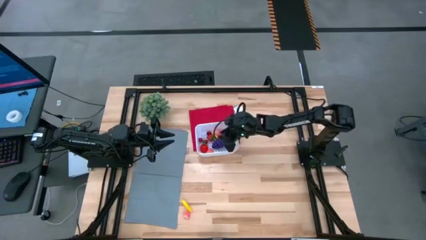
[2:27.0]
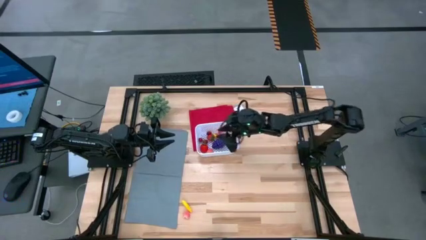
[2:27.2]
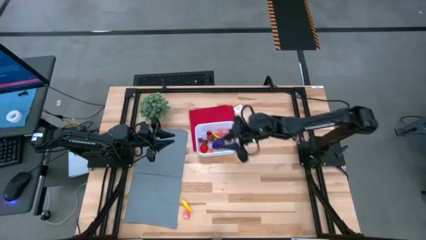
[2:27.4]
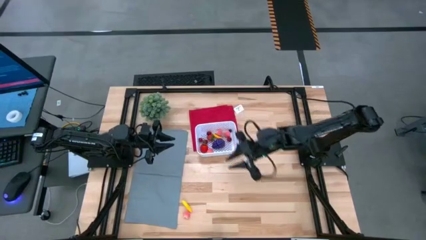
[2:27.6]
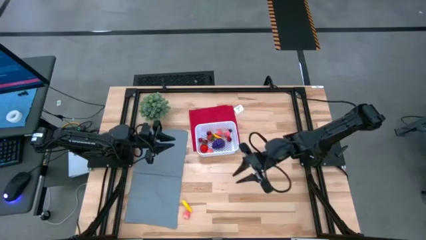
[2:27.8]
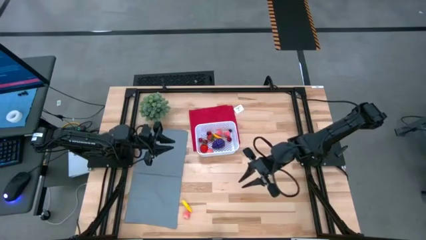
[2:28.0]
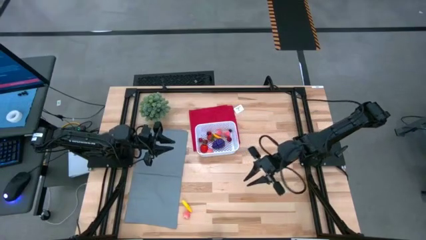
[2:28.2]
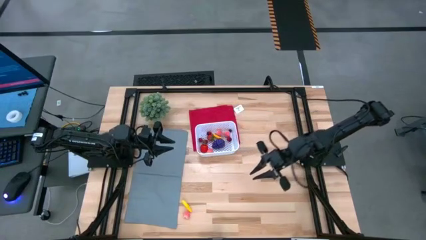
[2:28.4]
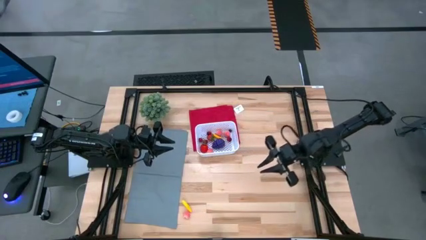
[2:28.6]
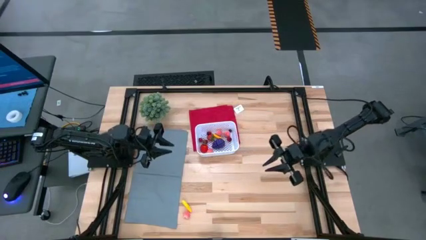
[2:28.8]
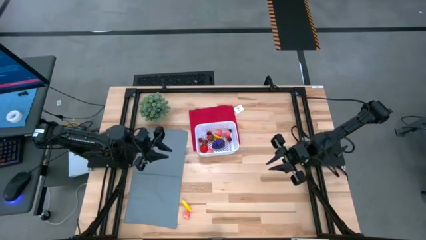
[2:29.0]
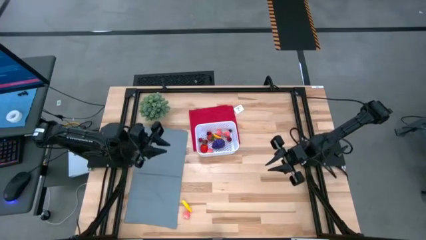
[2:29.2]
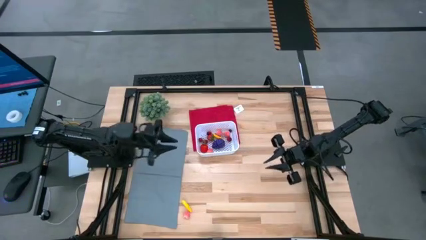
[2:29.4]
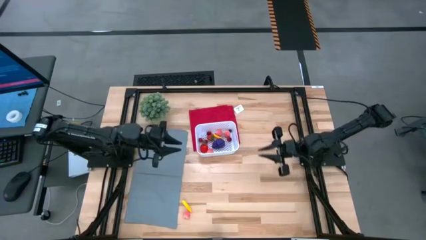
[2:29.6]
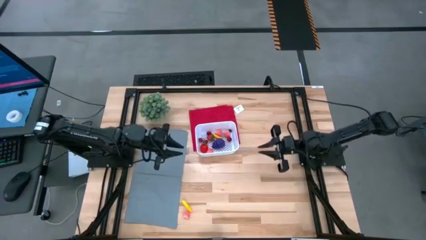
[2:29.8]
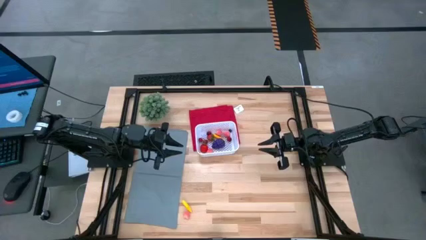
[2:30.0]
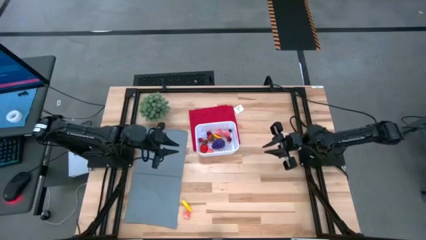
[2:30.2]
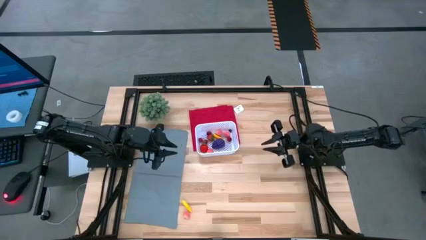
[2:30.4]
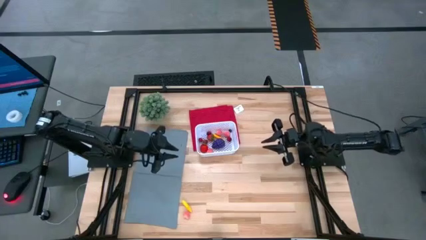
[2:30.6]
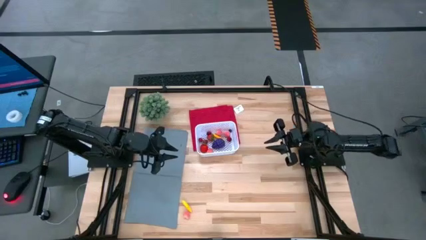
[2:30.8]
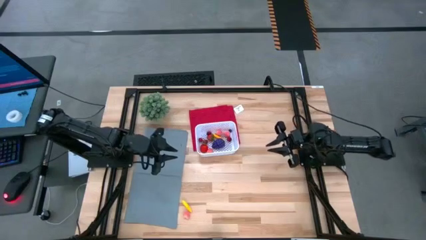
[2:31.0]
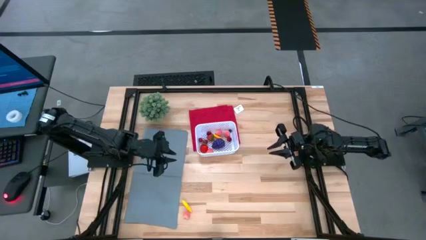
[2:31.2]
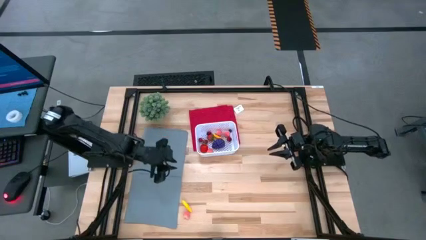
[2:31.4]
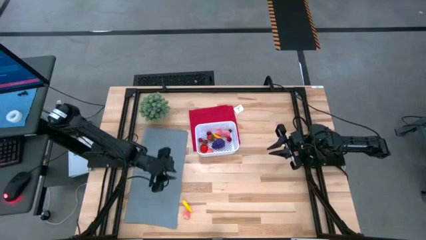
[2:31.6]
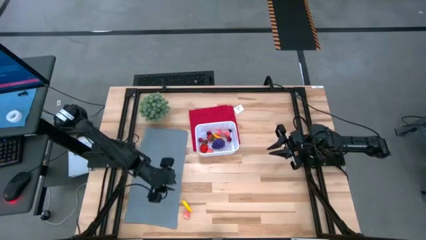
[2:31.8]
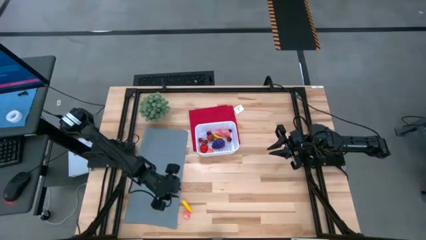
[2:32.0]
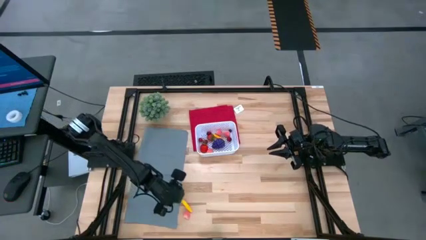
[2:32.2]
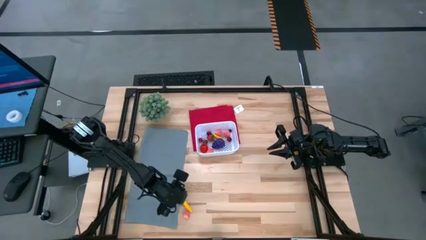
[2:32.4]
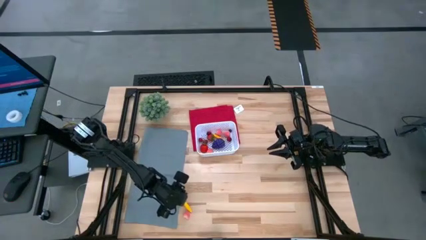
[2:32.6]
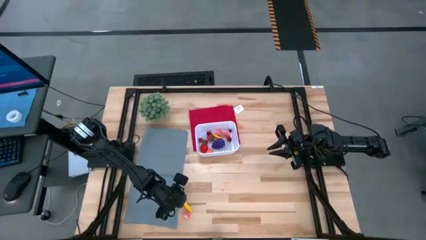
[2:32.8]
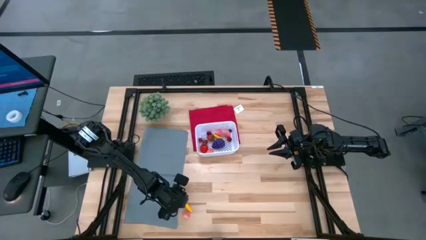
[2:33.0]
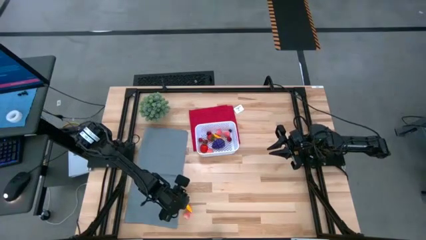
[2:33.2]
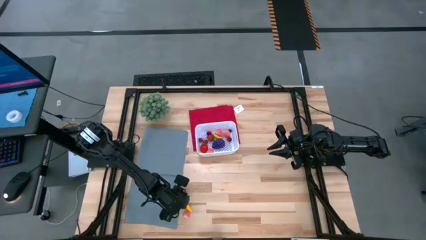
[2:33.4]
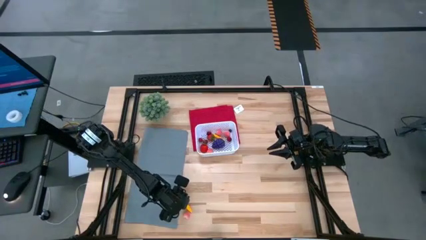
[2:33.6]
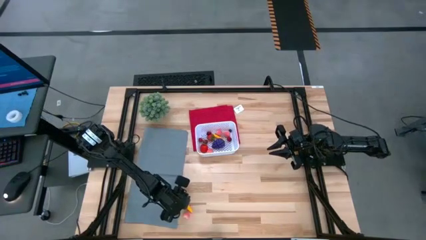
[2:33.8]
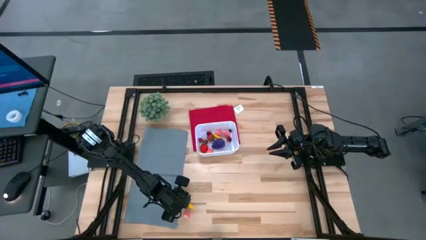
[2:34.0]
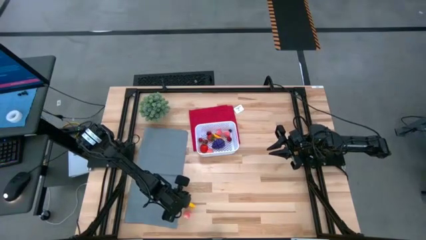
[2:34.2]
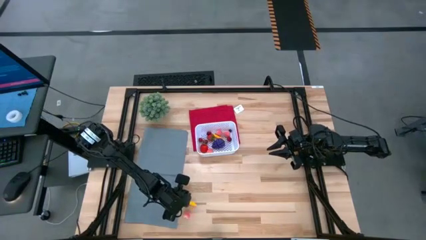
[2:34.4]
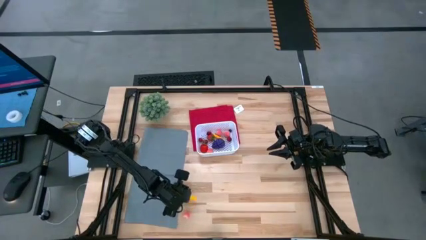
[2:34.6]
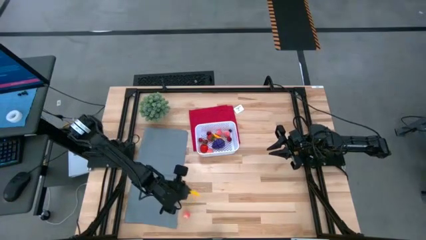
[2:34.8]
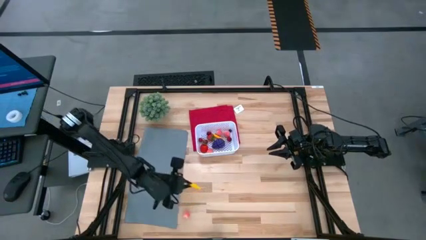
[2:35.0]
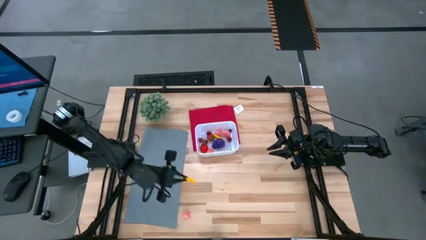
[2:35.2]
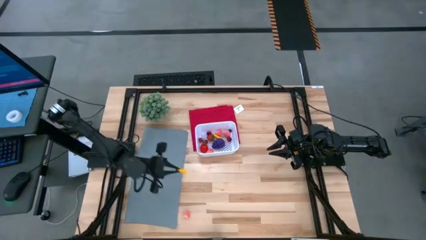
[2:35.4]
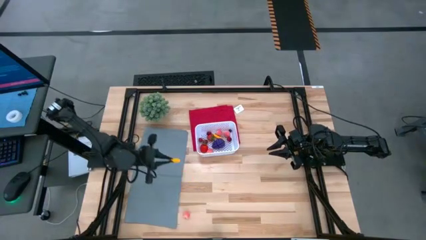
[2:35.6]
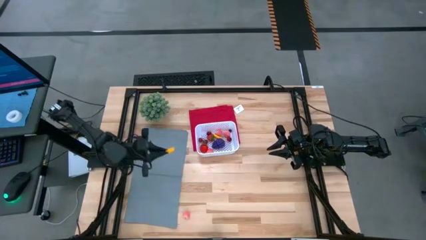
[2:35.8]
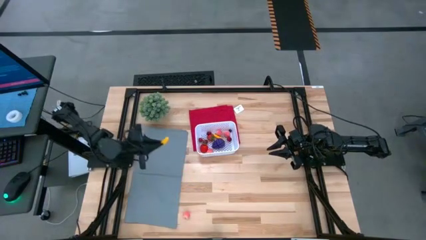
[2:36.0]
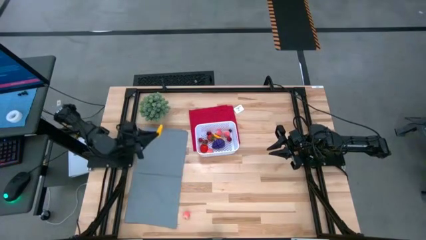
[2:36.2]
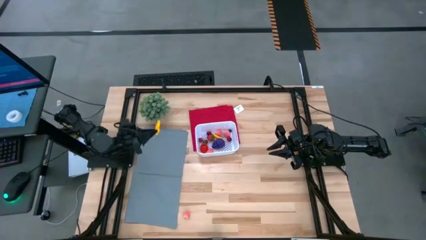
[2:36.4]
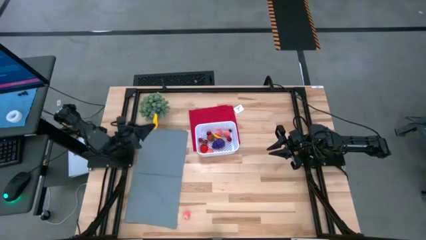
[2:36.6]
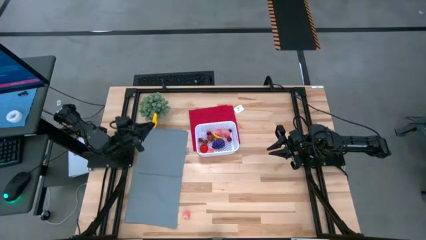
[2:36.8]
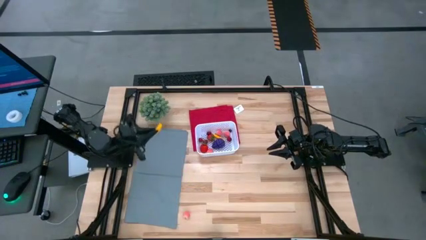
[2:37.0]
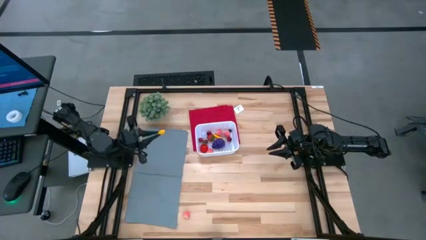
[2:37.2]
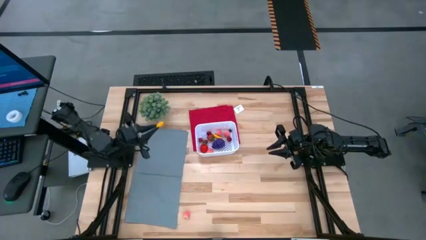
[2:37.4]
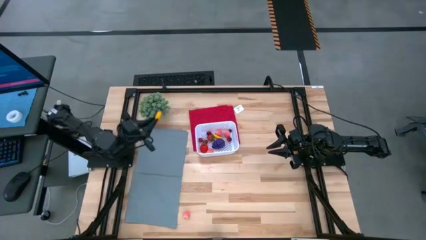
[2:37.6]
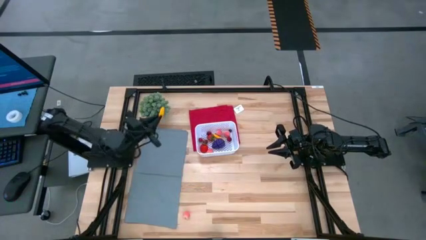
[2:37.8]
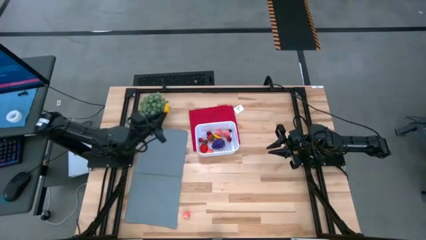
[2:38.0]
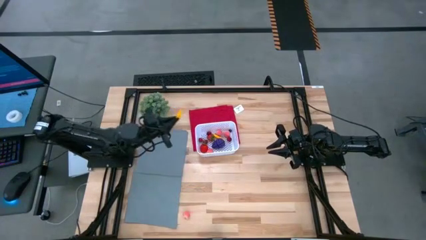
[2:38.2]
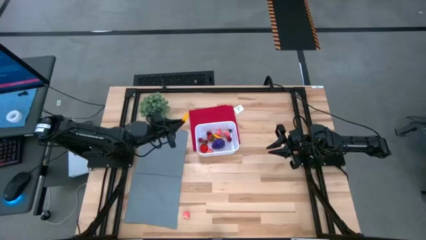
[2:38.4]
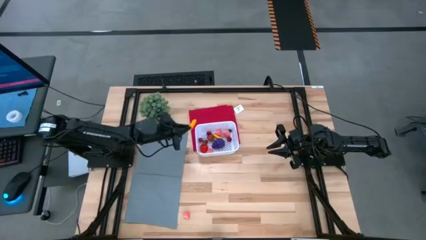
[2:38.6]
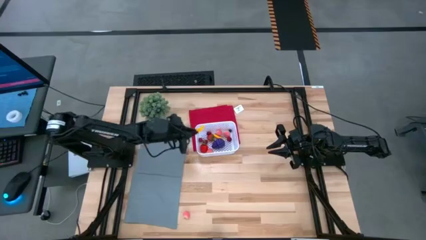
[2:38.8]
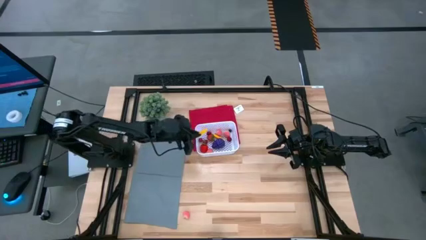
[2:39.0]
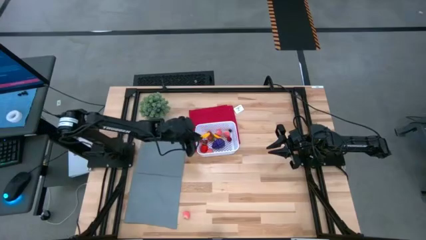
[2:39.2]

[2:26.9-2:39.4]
Task: Pick and placing Produce into tupperware
Put the yellow corn into the white bin
